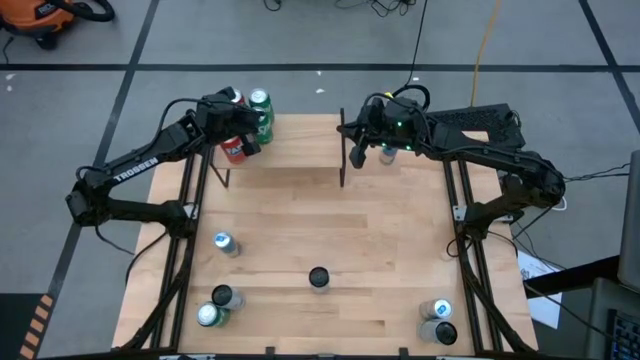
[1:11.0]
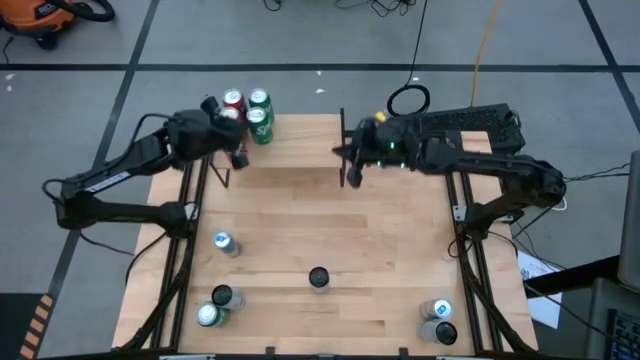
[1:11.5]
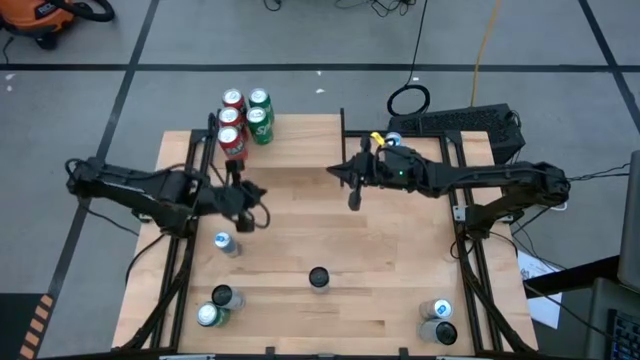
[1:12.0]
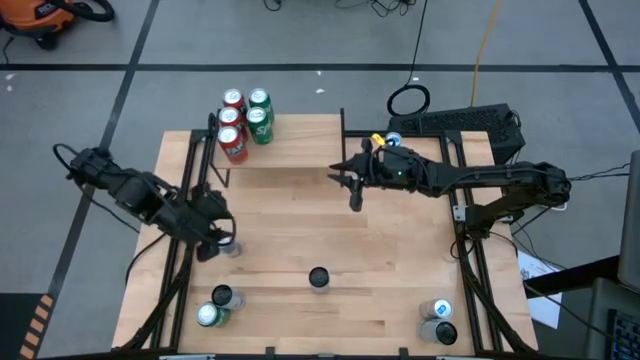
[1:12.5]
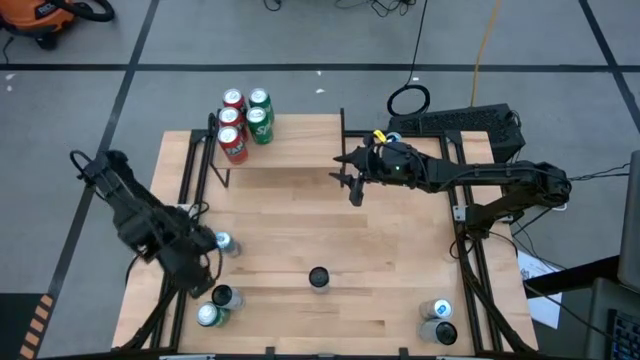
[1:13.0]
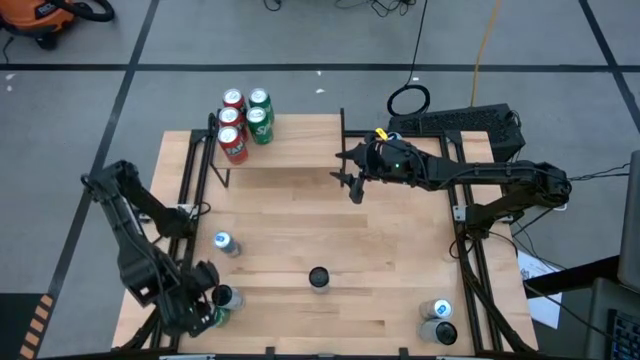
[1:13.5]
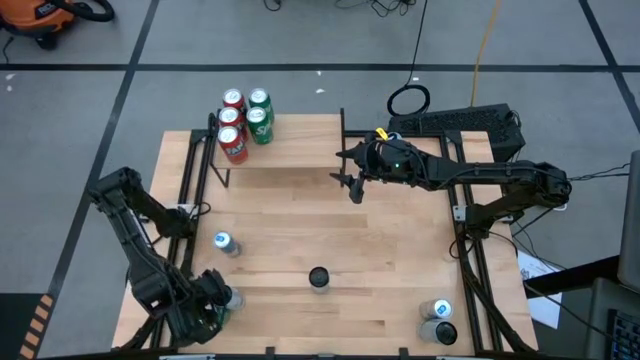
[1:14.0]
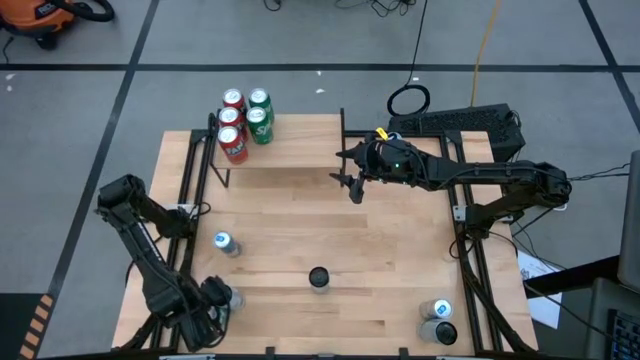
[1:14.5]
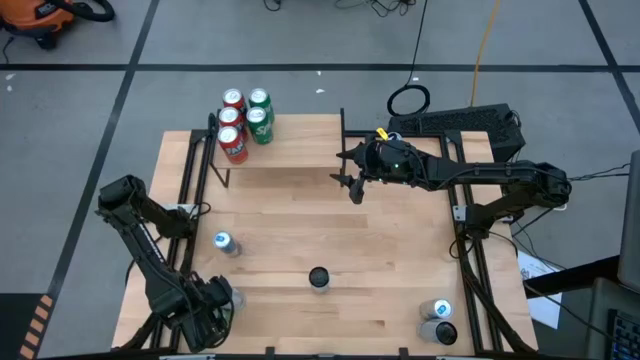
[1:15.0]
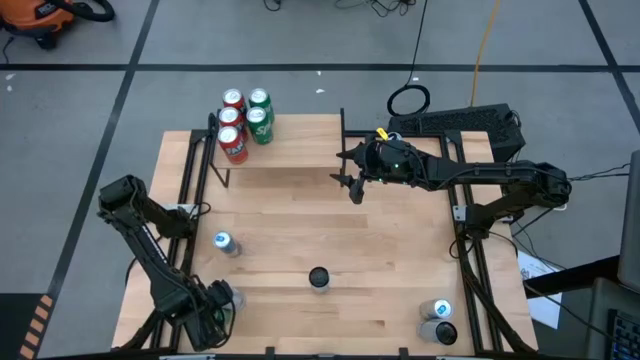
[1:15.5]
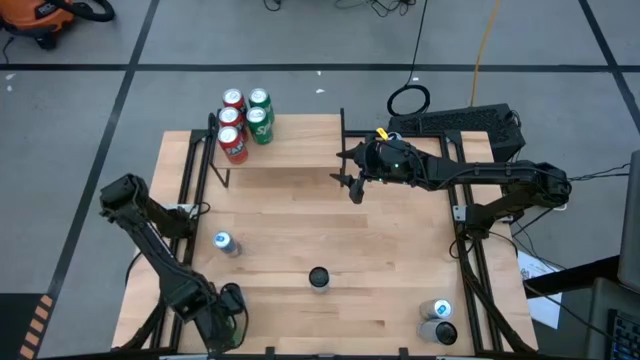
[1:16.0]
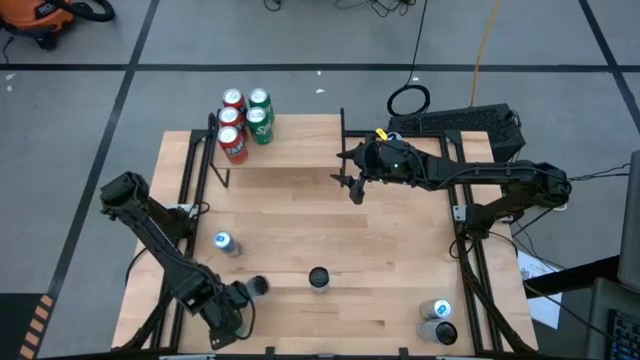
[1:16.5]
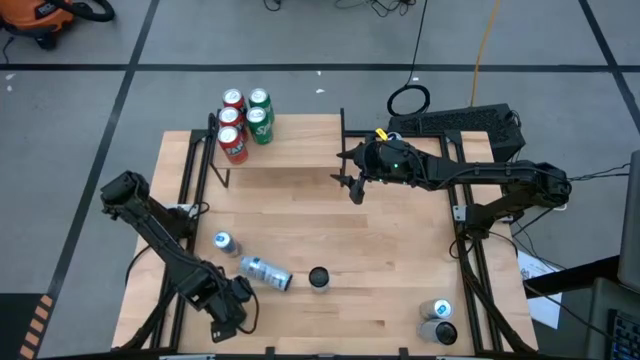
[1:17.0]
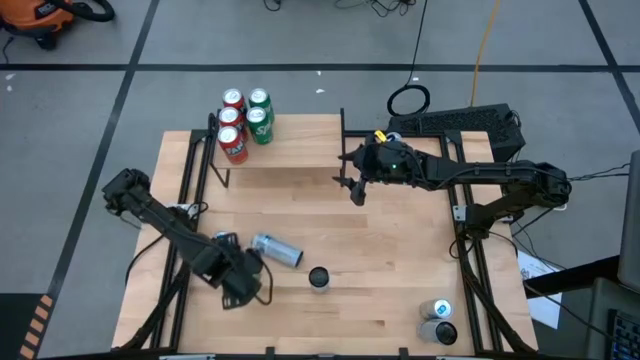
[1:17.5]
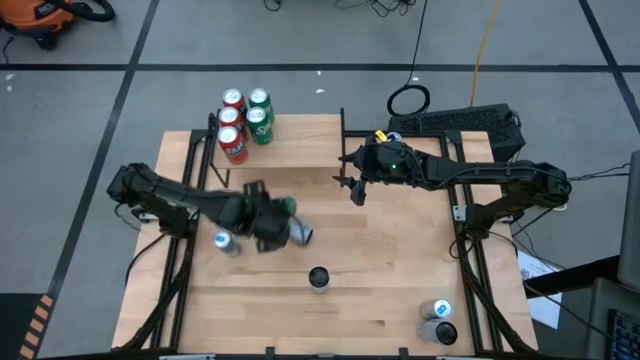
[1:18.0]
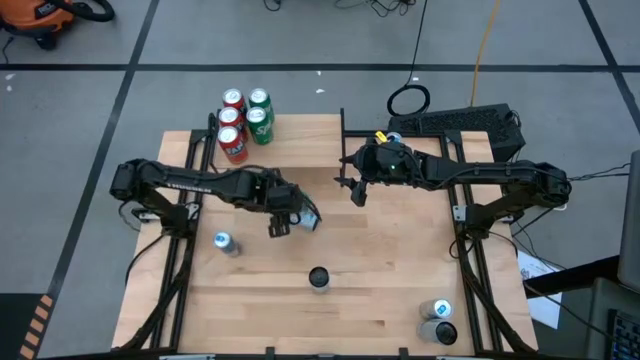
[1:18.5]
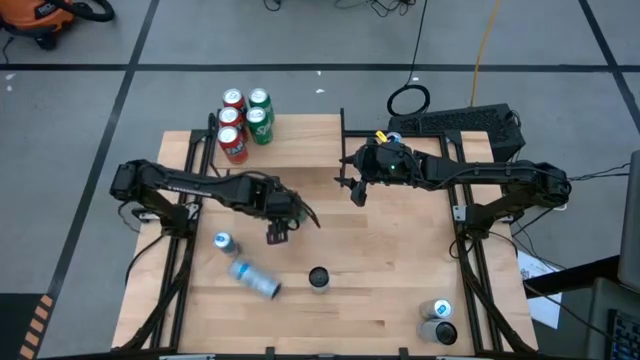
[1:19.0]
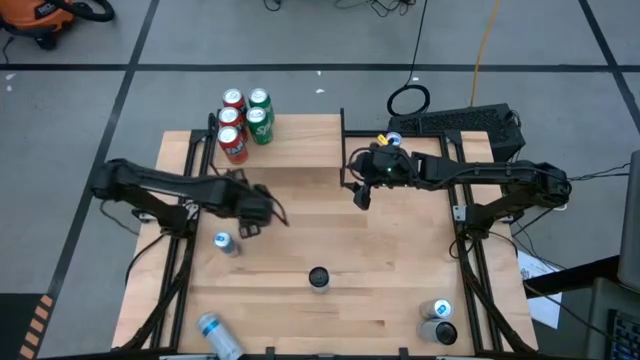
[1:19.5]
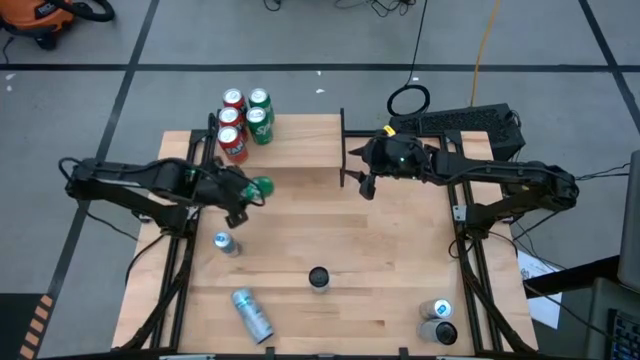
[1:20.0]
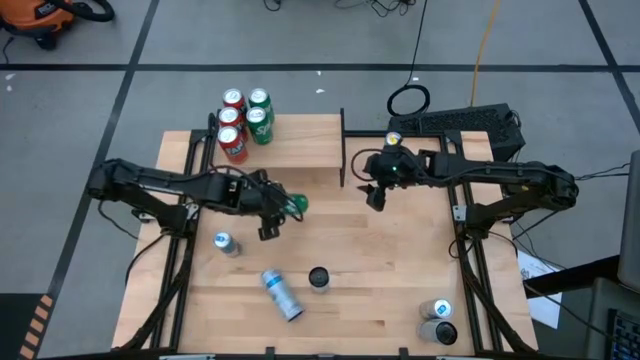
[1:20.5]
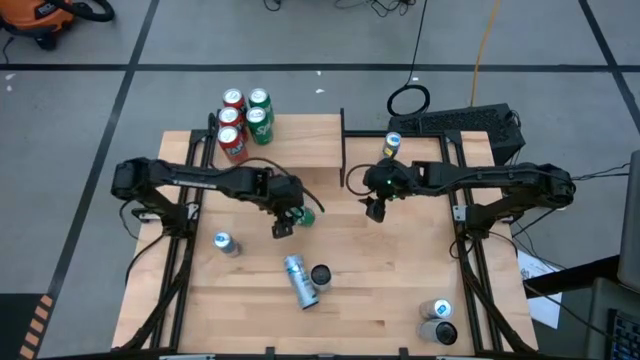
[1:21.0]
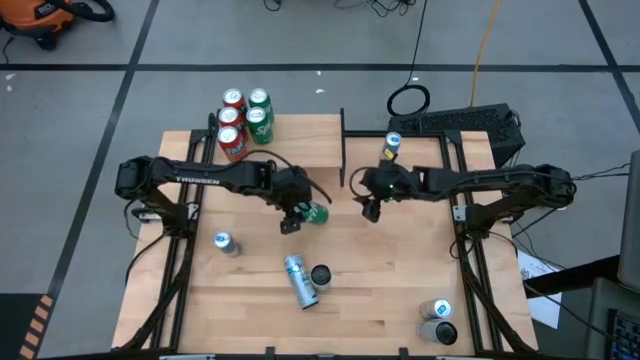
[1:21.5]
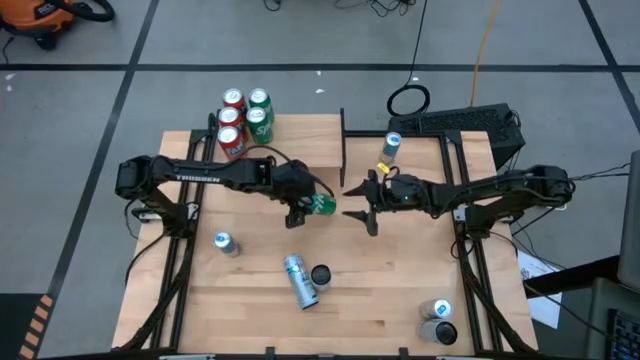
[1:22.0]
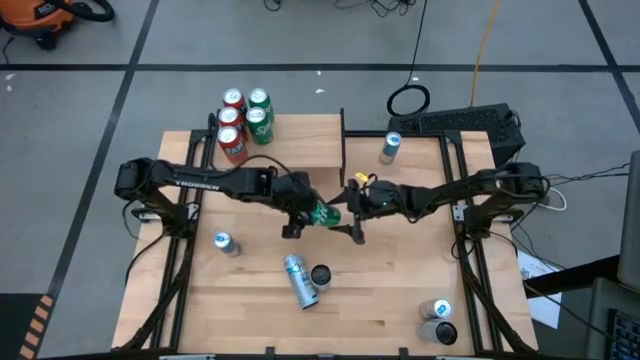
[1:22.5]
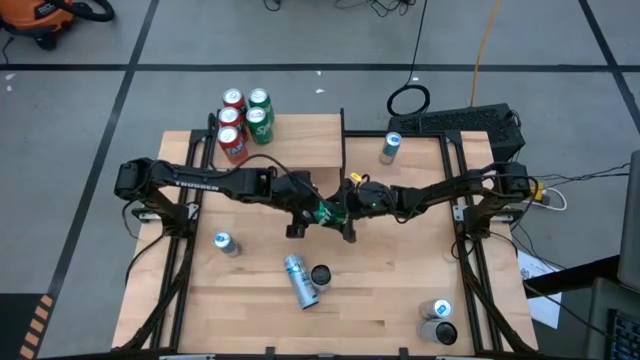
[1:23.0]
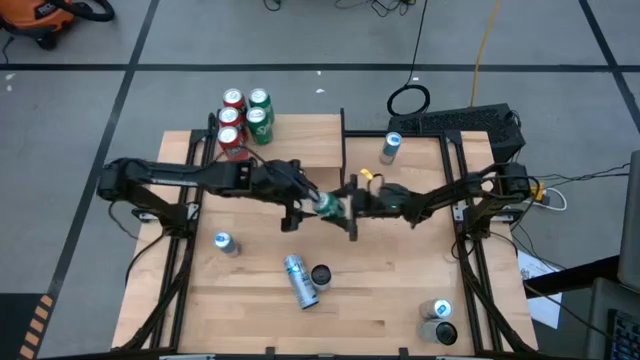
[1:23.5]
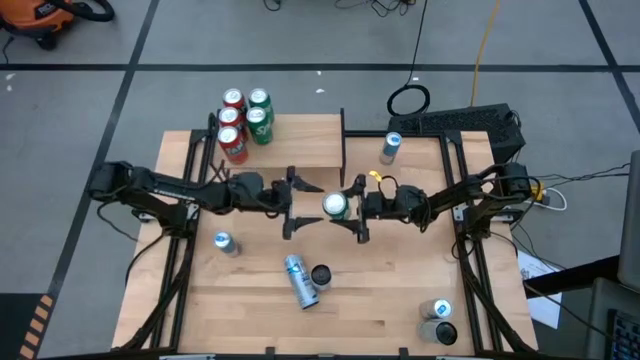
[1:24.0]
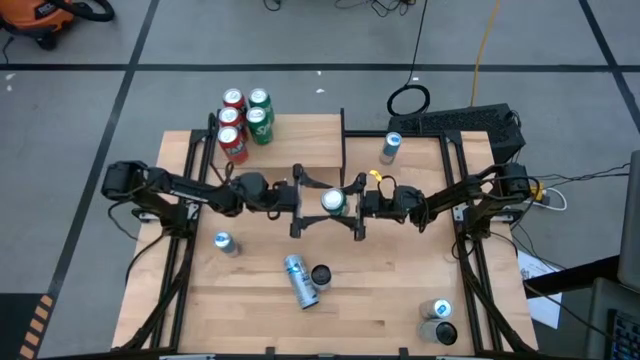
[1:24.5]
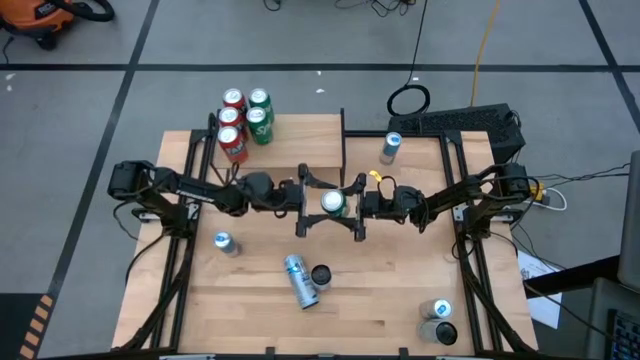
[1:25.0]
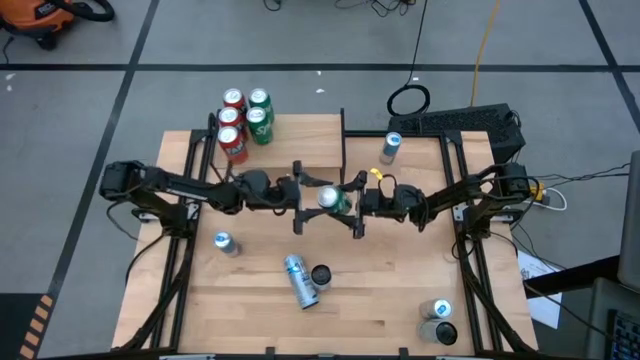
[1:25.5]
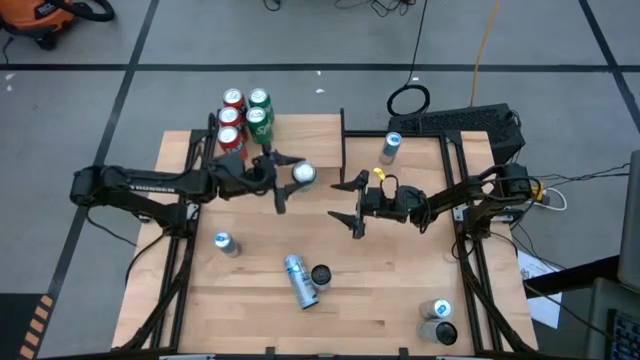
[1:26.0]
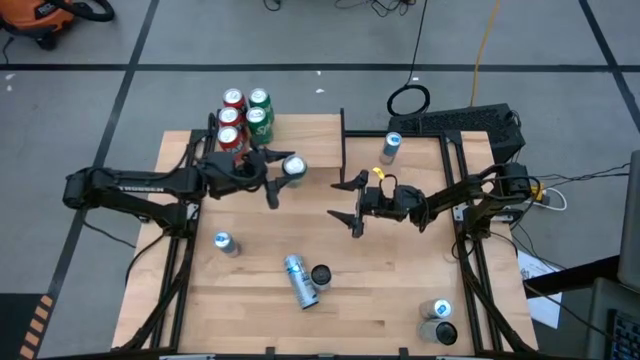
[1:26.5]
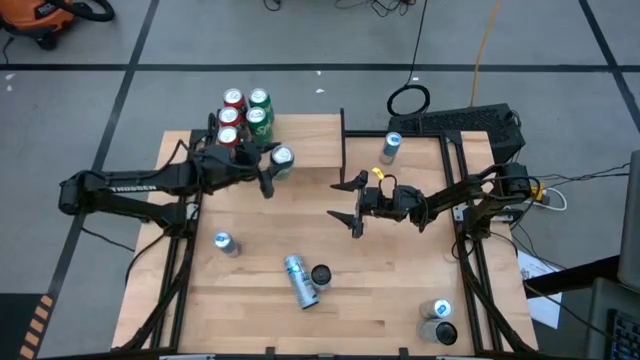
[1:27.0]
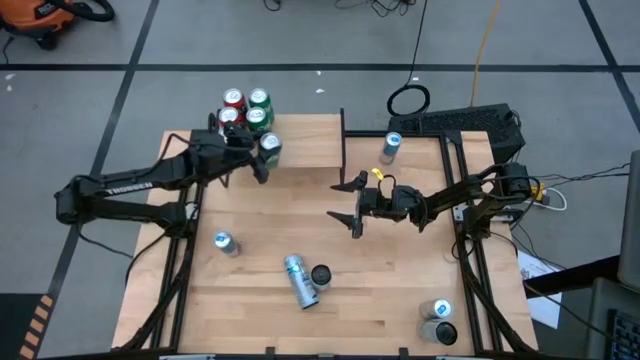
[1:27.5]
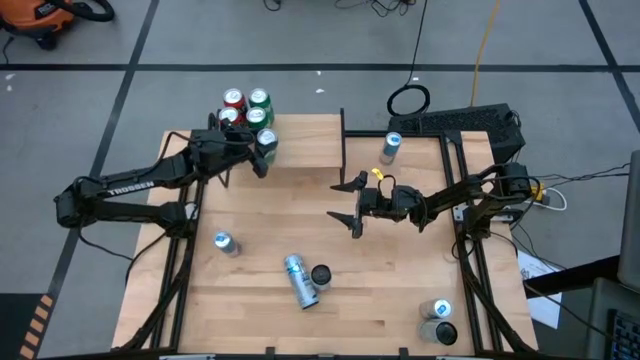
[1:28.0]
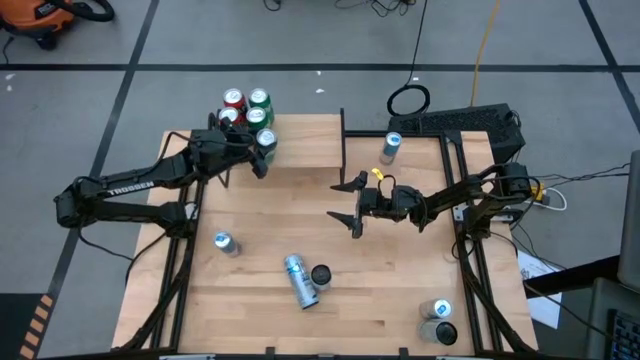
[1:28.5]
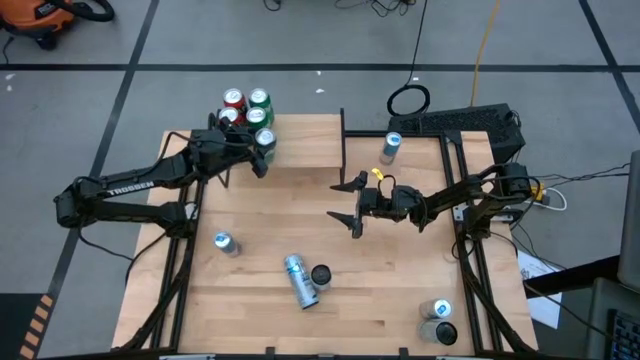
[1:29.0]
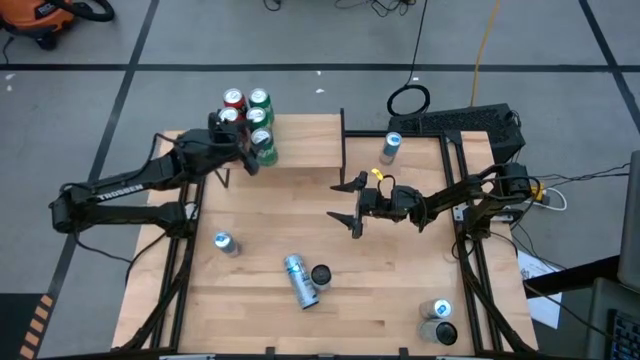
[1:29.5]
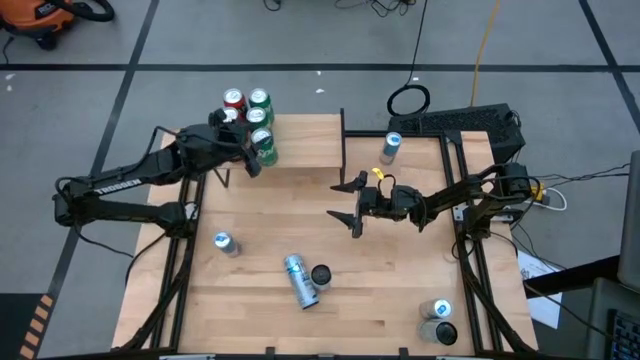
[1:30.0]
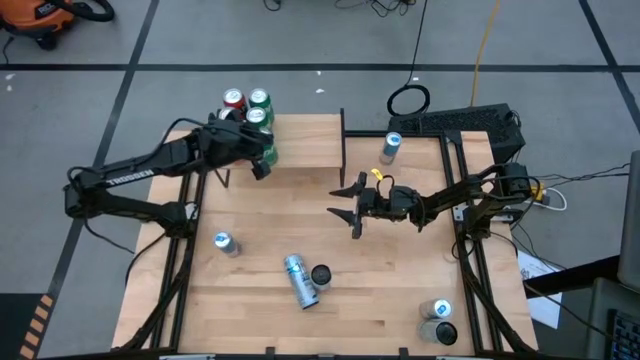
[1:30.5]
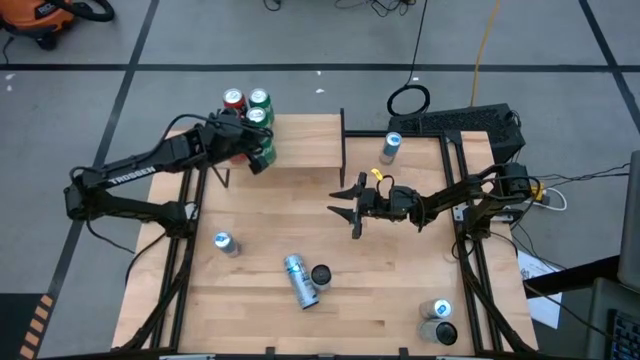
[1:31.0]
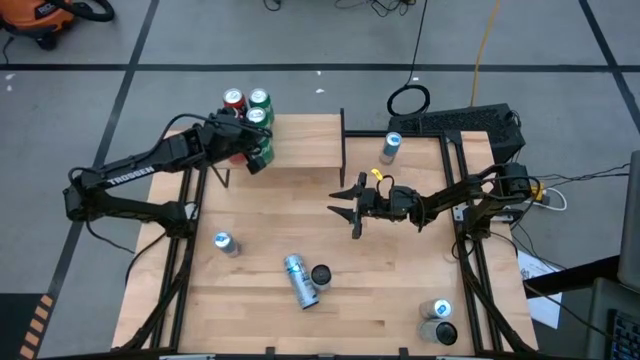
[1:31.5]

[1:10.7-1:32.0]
Task: Place canned beverage on shelf
Put the green soda can on the shelf
